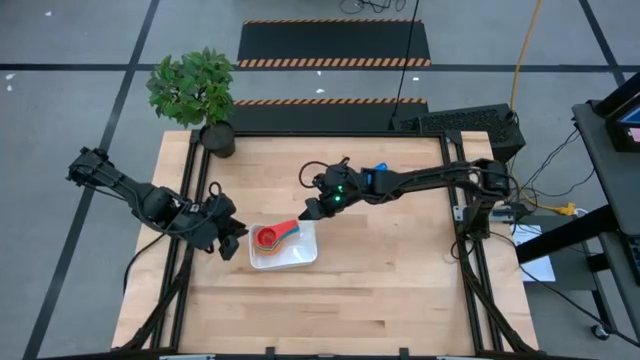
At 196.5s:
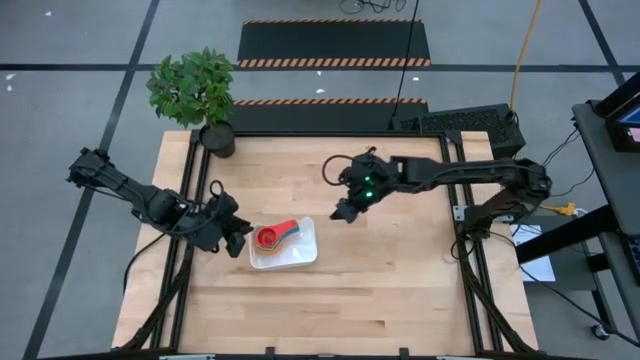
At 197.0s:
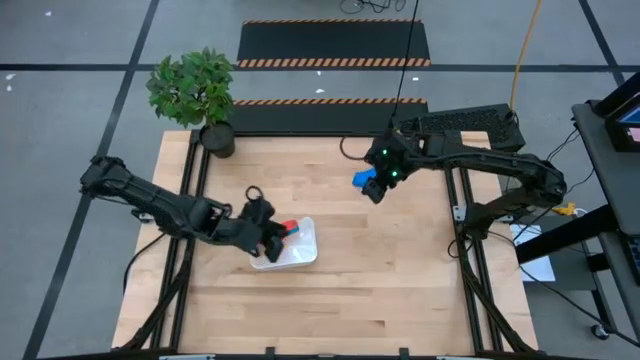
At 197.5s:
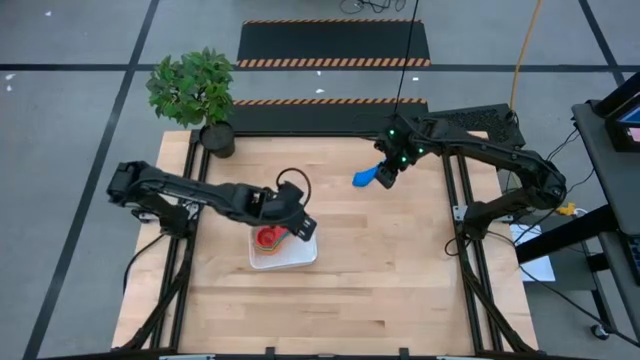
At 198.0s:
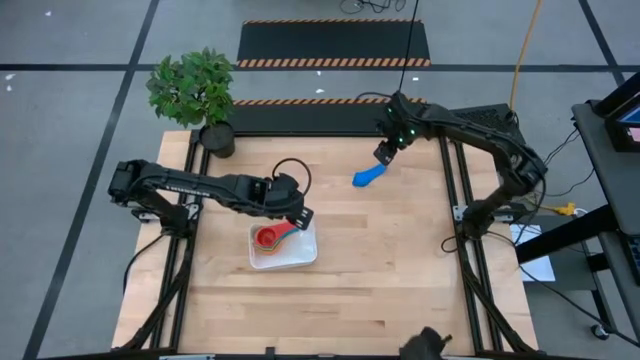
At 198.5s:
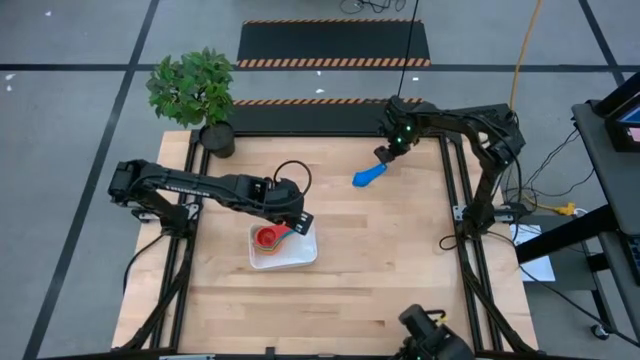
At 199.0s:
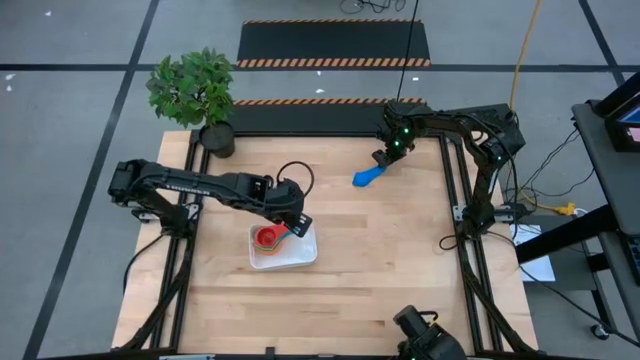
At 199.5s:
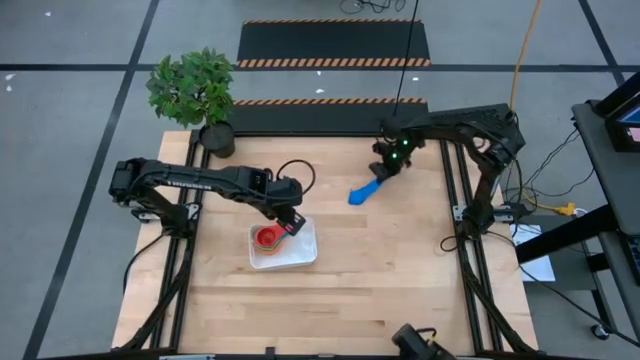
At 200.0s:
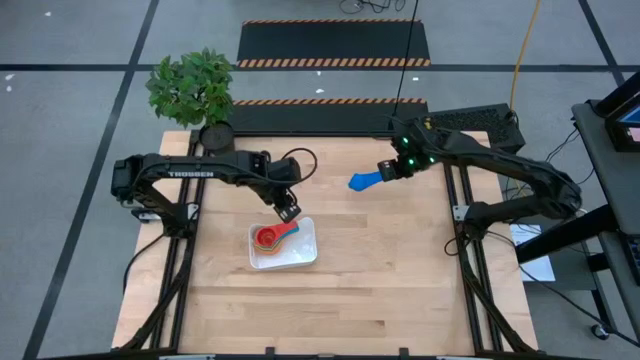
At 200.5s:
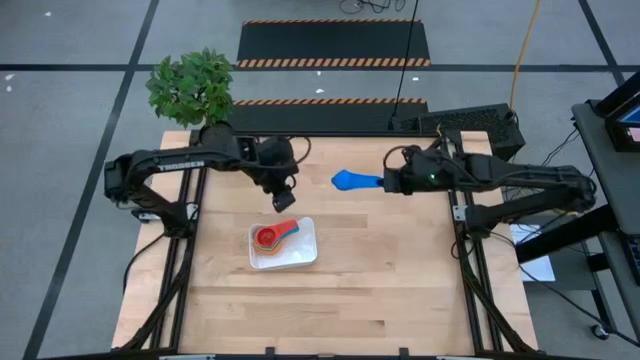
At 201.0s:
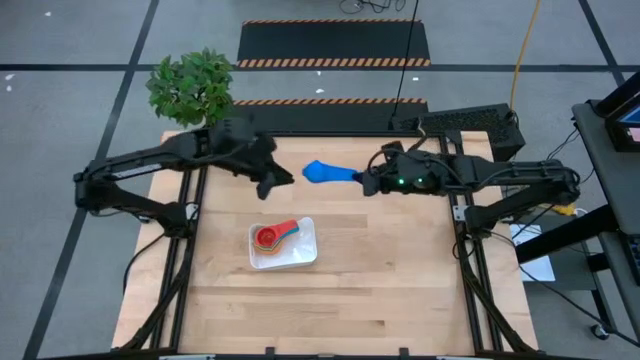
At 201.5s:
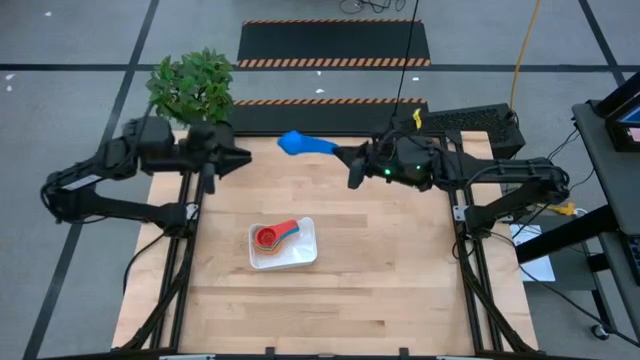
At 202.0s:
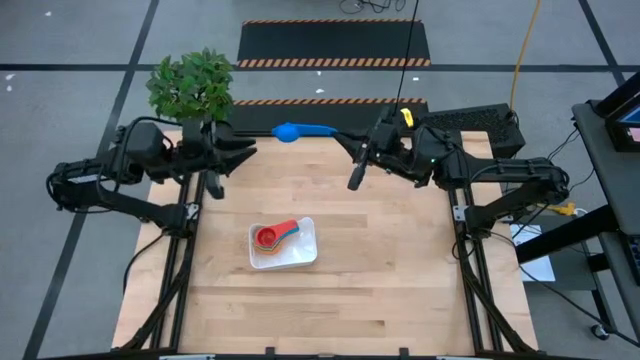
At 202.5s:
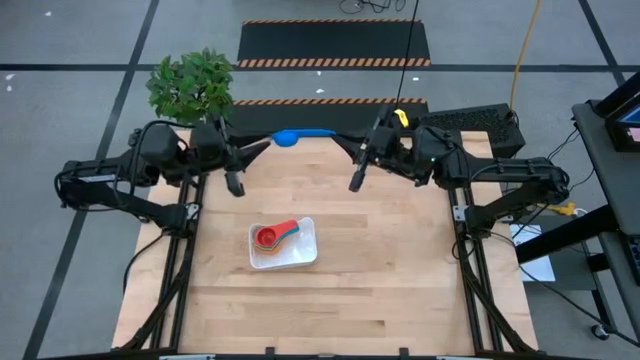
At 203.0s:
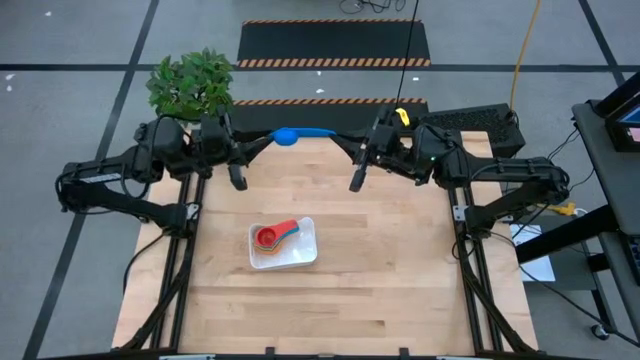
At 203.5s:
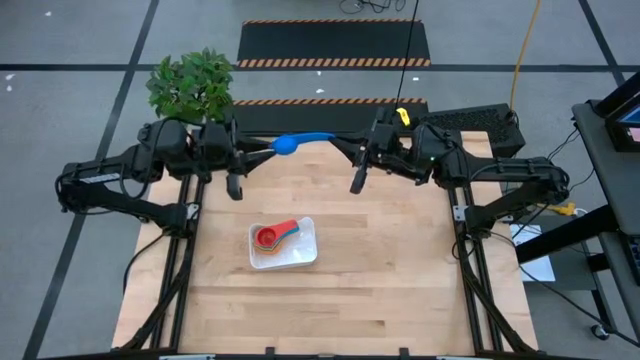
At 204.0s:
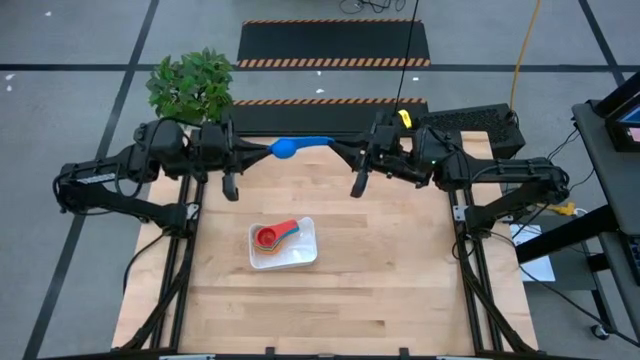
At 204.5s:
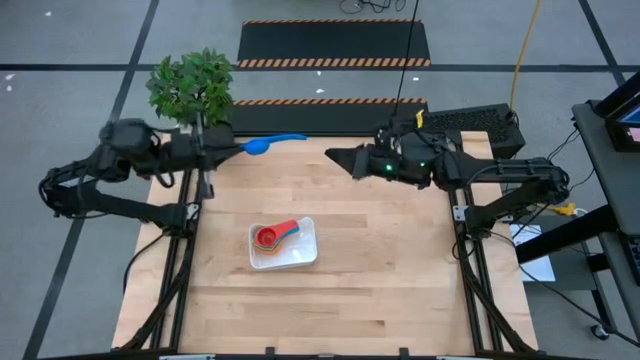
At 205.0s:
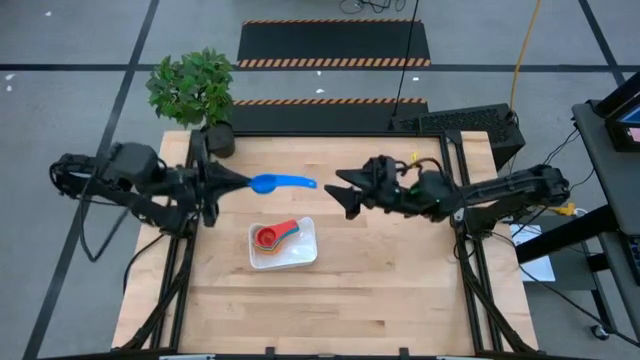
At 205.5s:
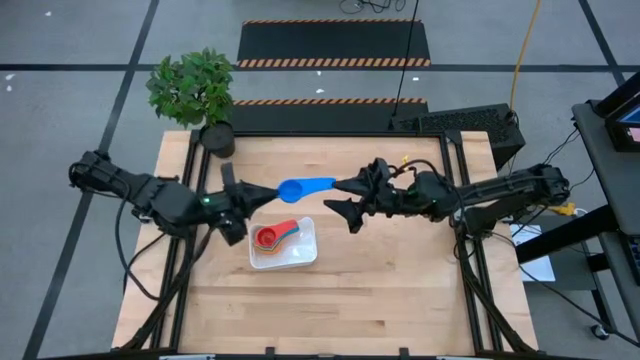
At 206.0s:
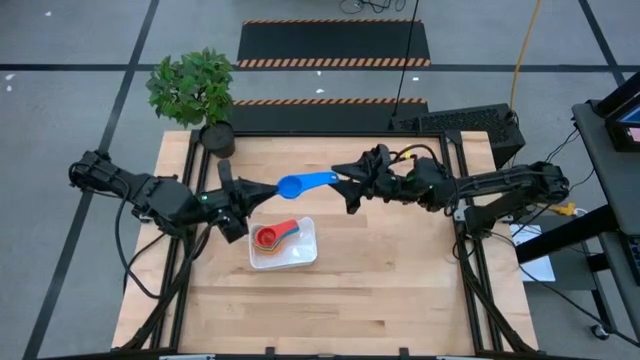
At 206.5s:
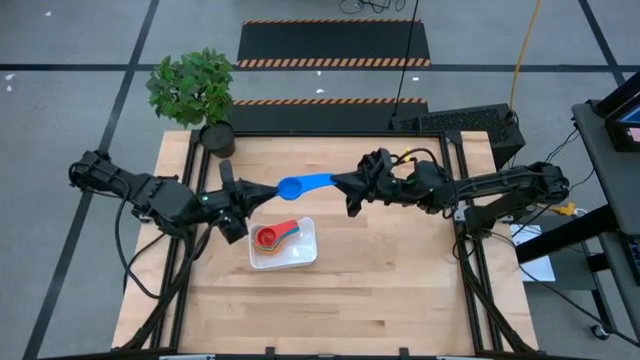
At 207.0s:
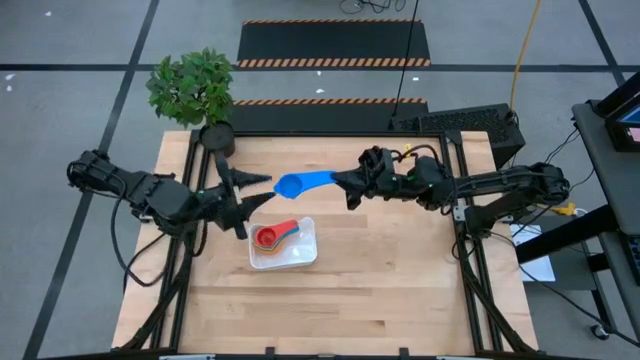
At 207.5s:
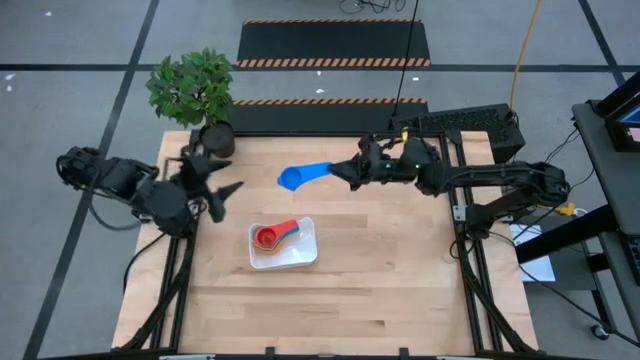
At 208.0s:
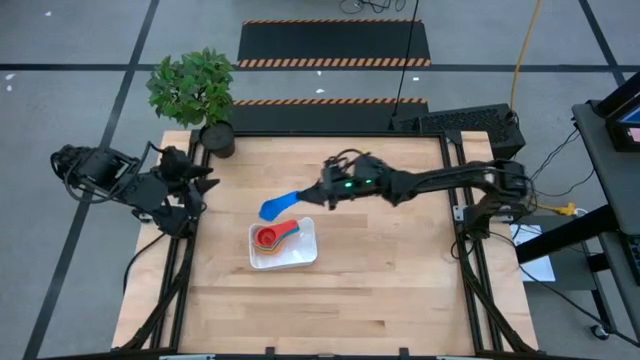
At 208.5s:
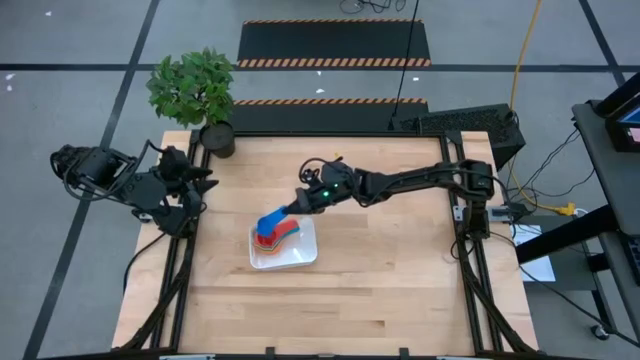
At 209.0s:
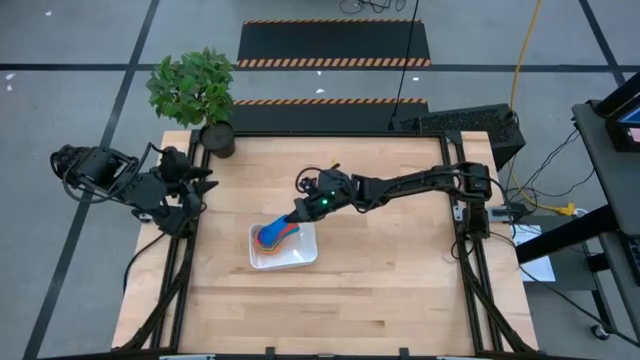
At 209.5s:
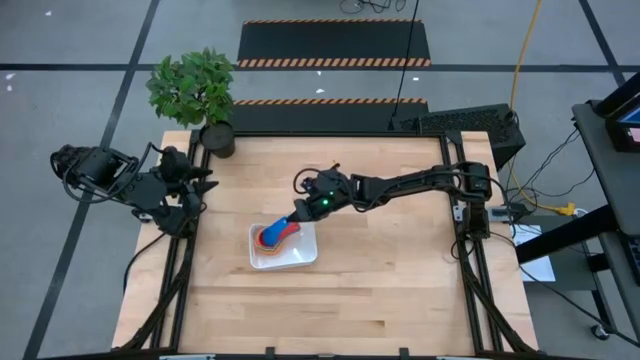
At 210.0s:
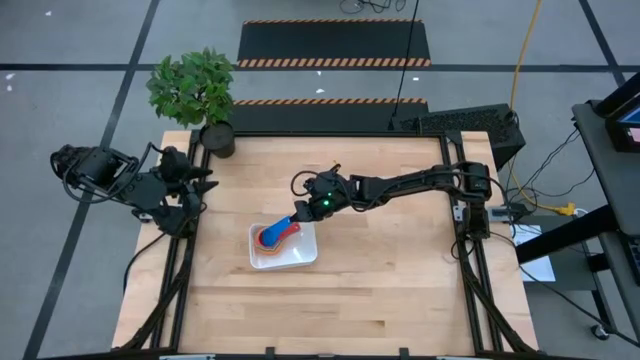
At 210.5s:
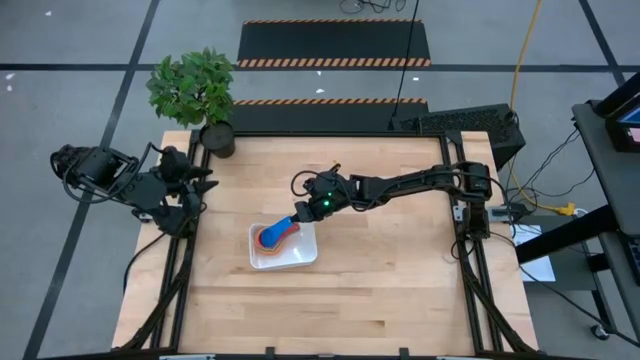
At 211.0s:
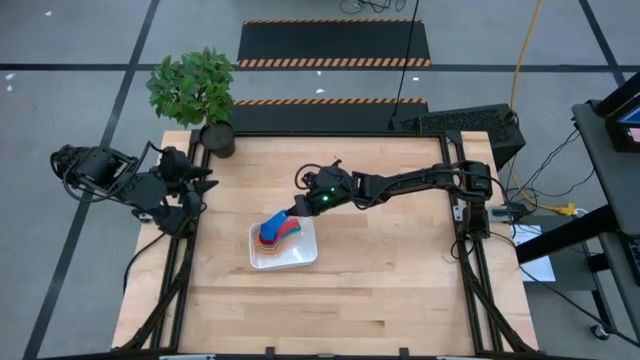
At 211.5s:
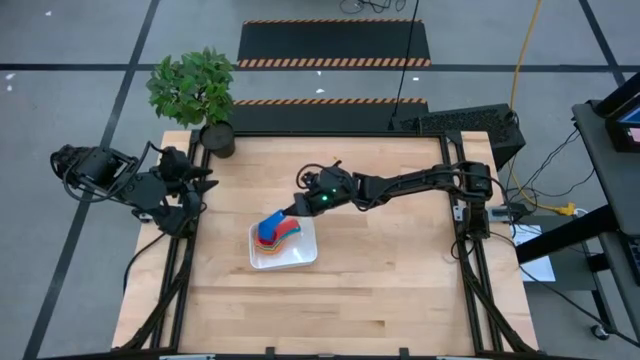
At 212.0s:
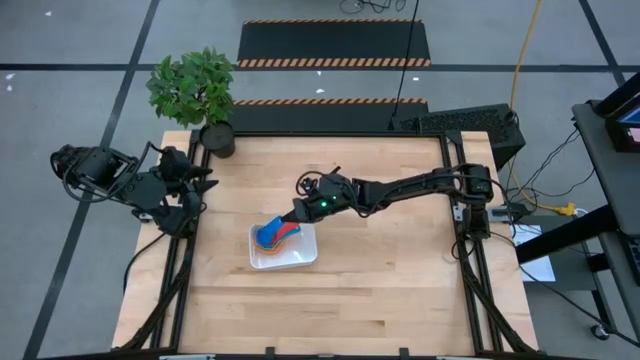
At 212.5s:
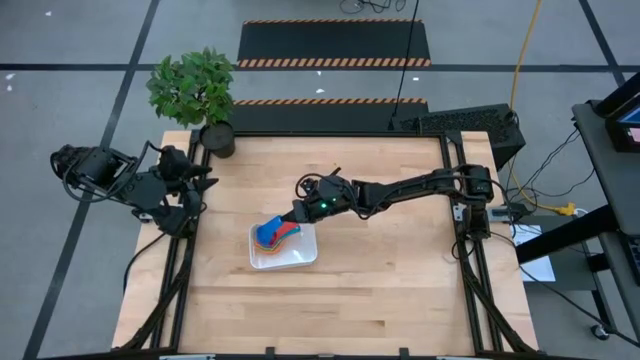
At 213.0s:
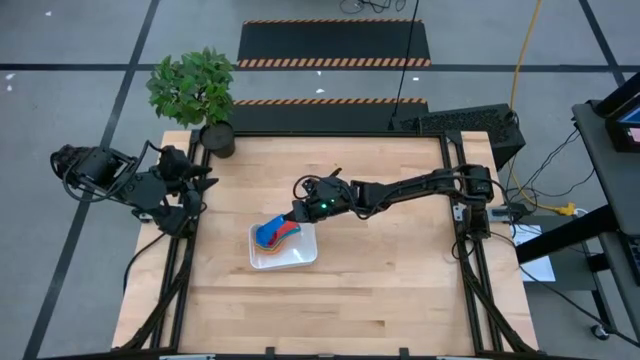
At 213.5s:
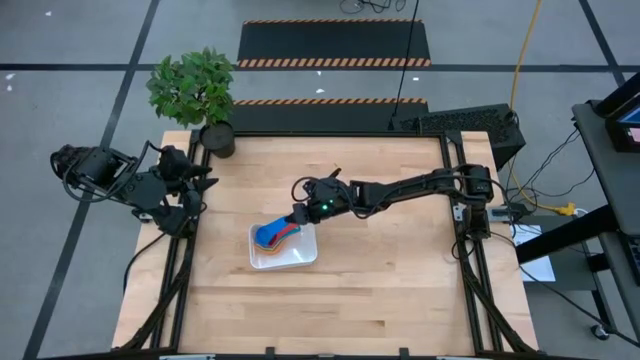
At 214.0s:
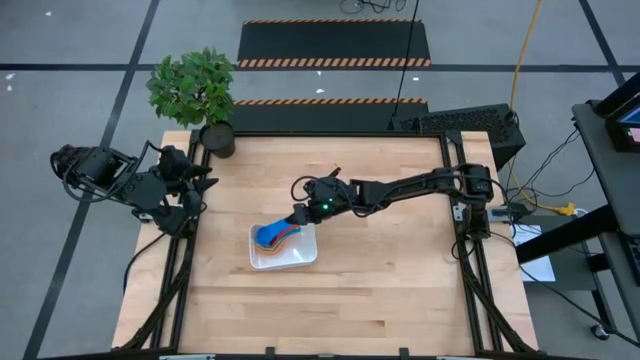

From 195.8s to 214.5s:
Task: Nest measuring cups in basket
Stack the blue measuring cup on top of the red measuring cup in the white bin
